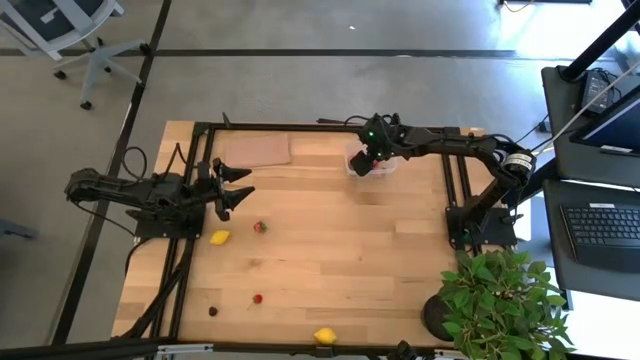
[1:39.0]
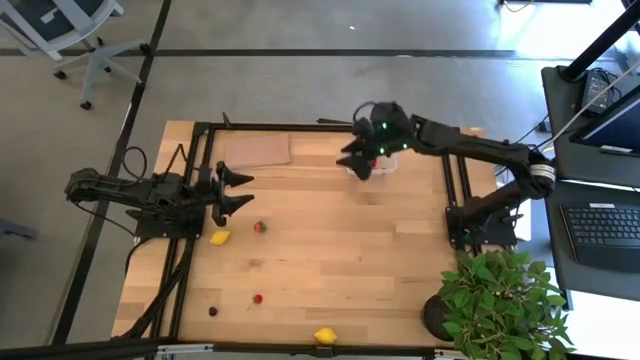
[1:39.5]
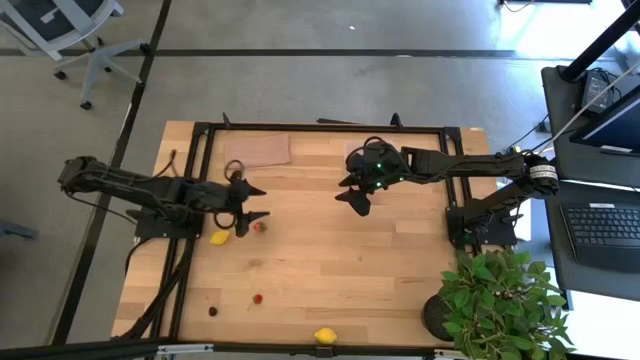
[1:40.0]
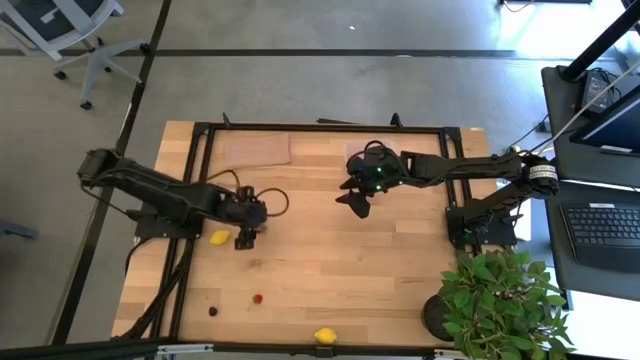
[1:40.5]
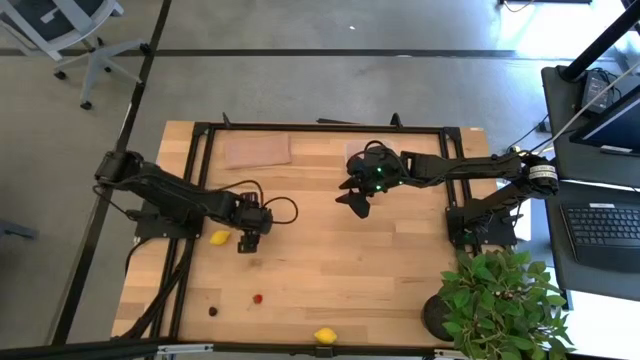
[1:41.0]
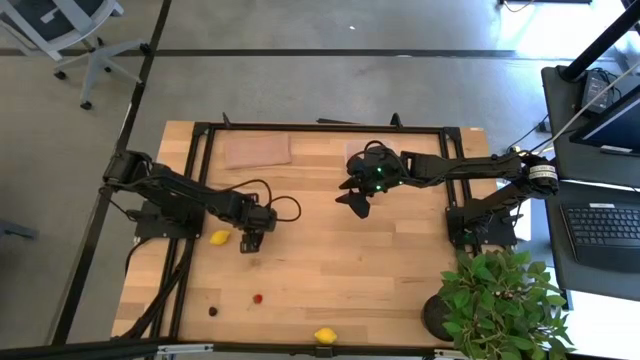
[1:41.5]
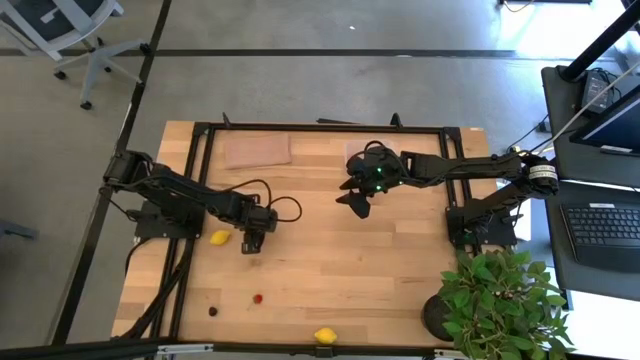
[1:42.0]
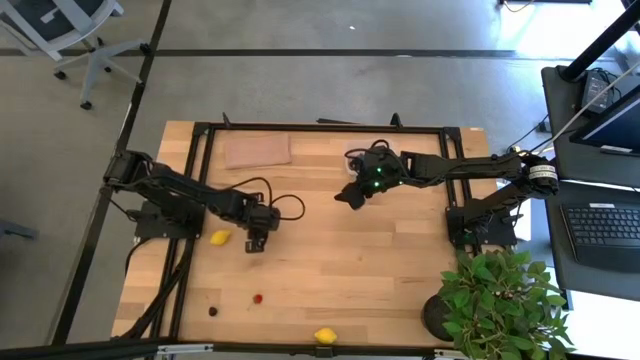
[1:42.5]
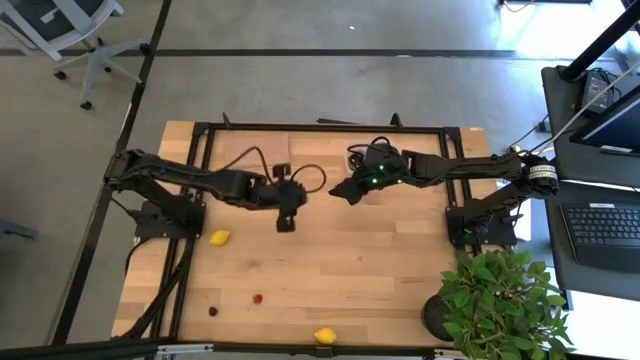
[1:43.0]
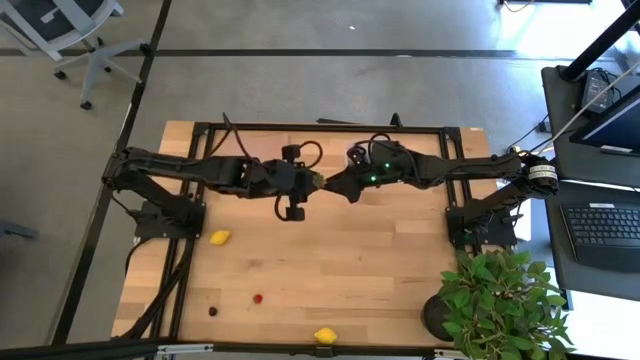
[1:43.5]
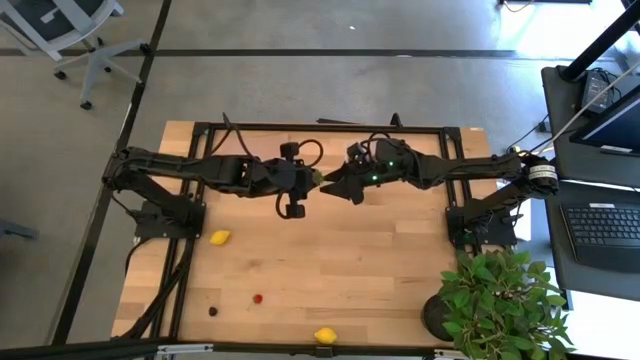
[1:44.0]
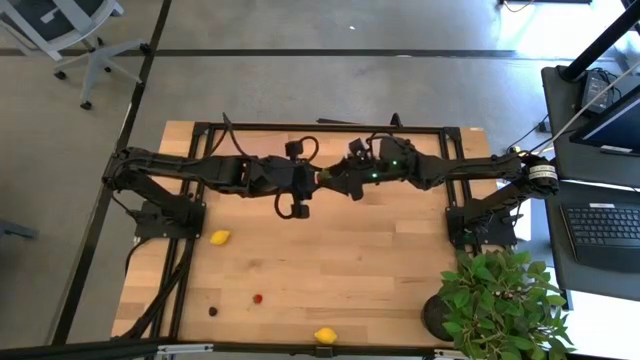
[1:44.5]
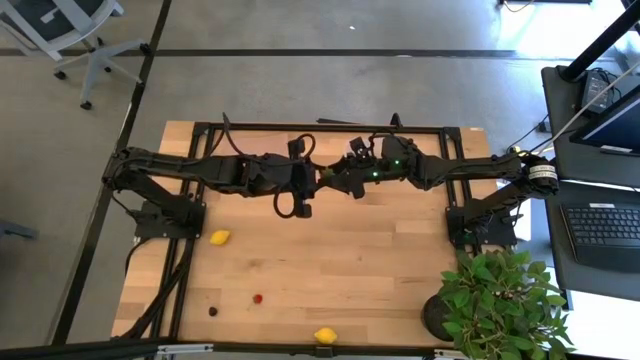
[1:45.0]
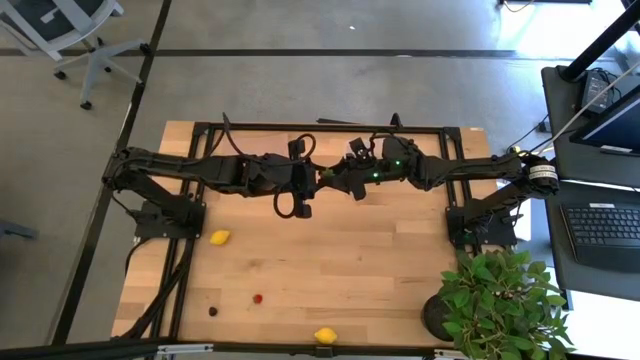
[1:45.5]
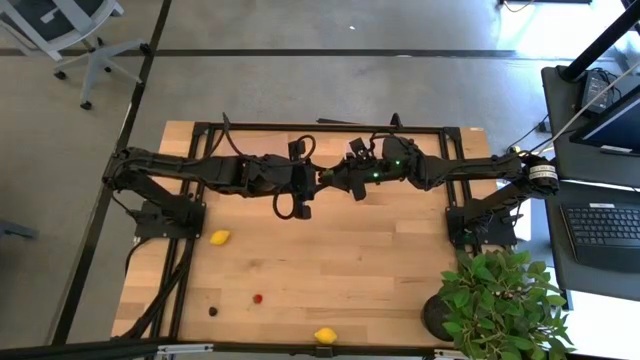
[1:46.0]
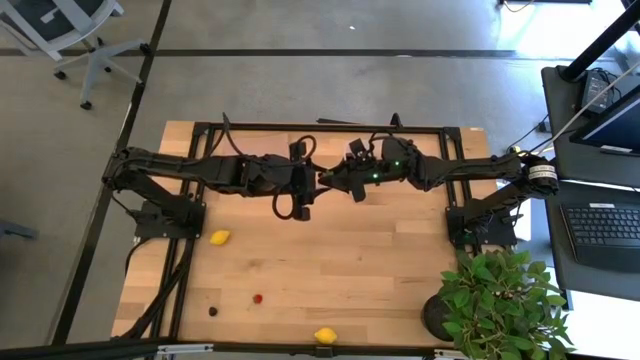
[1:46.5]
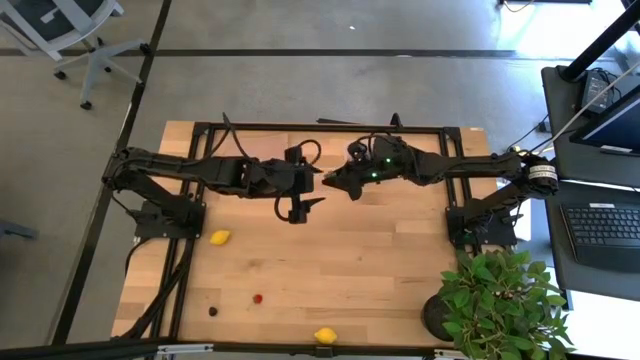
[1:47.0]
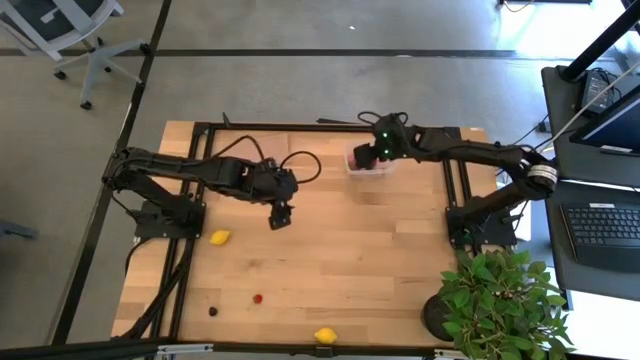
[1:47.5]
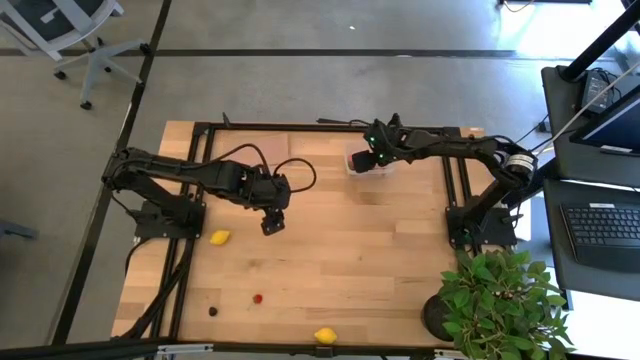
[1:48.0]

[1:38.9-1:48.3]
Task: Pick and placing Produce into tupperware
Put the strawberry into the transparent bin

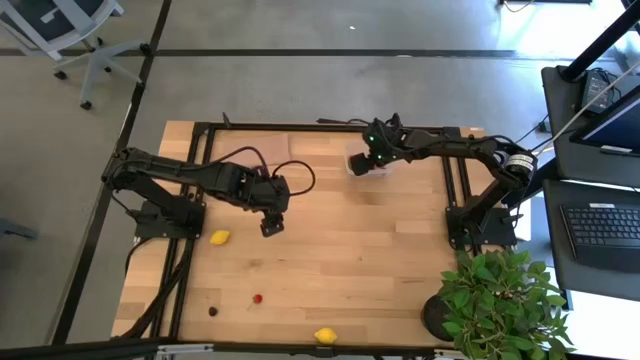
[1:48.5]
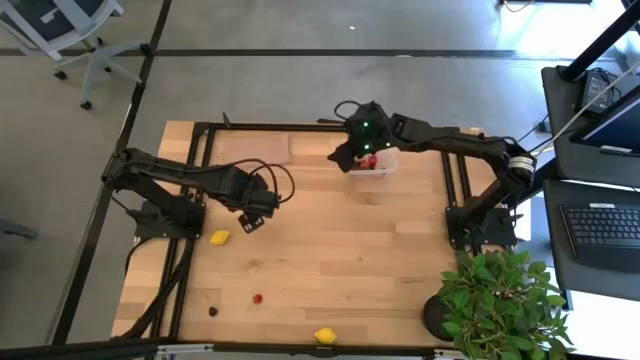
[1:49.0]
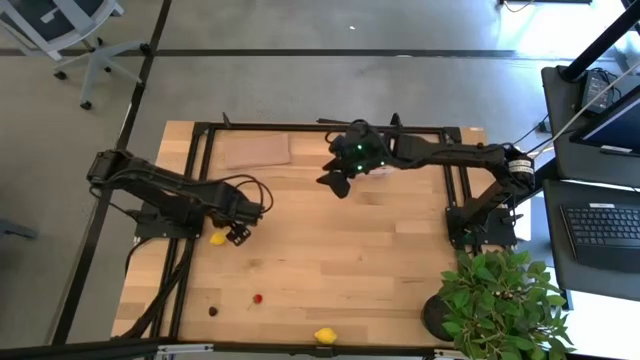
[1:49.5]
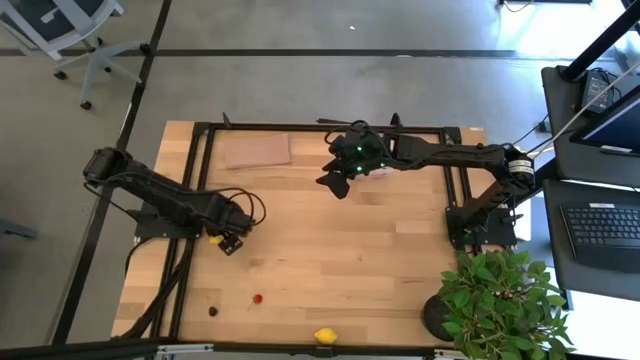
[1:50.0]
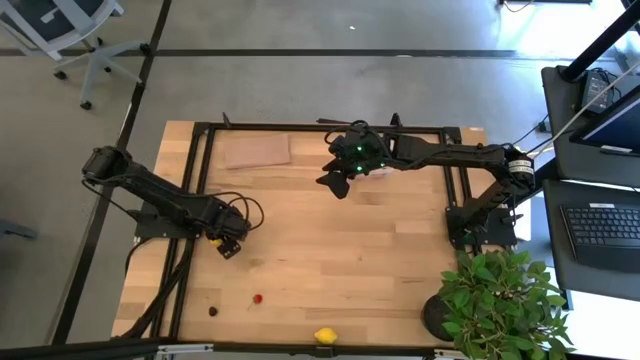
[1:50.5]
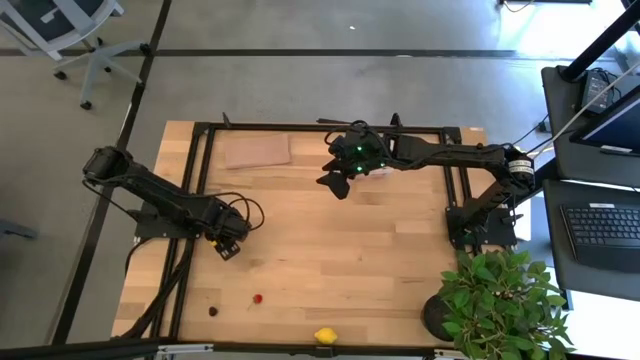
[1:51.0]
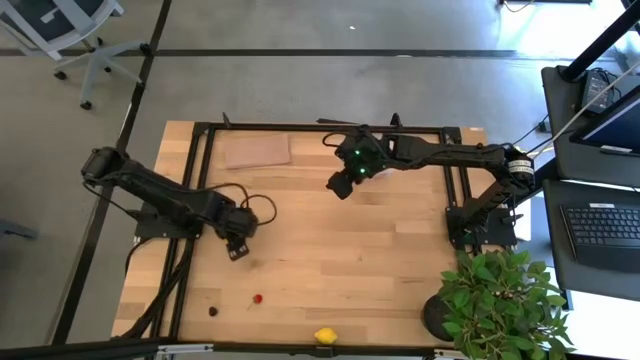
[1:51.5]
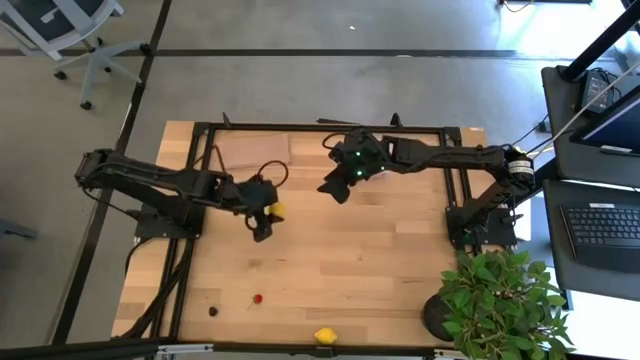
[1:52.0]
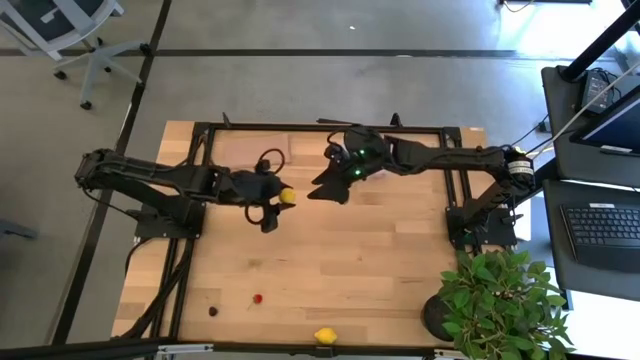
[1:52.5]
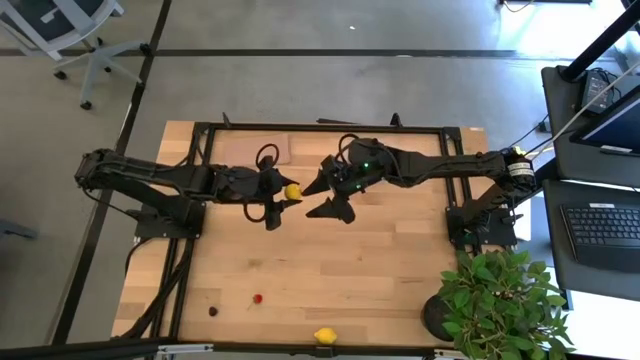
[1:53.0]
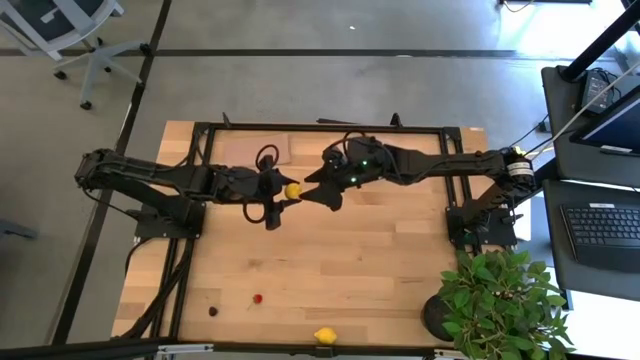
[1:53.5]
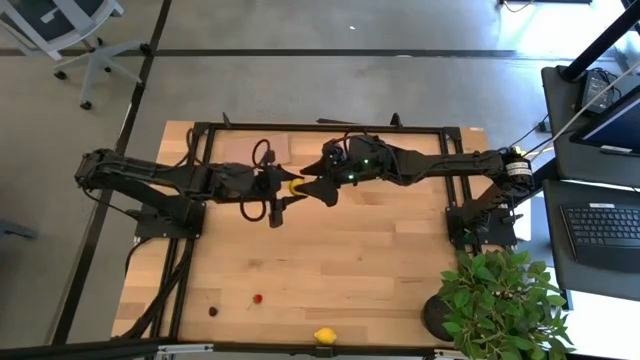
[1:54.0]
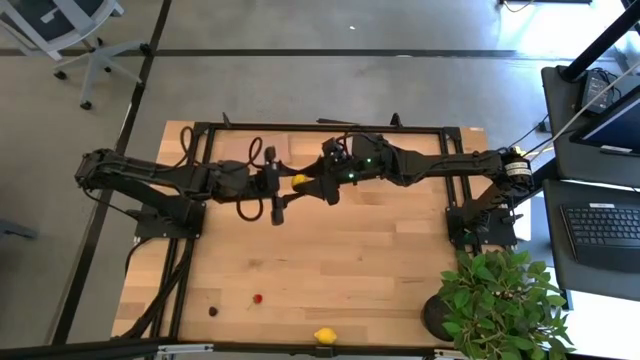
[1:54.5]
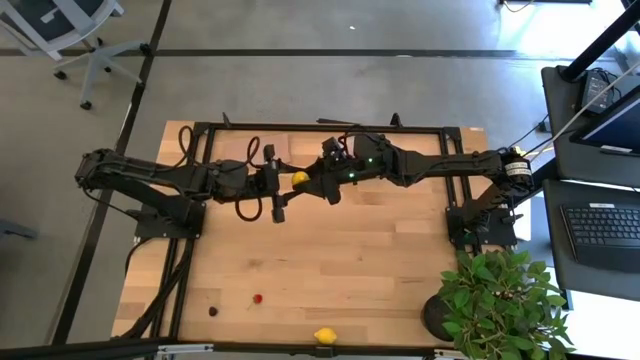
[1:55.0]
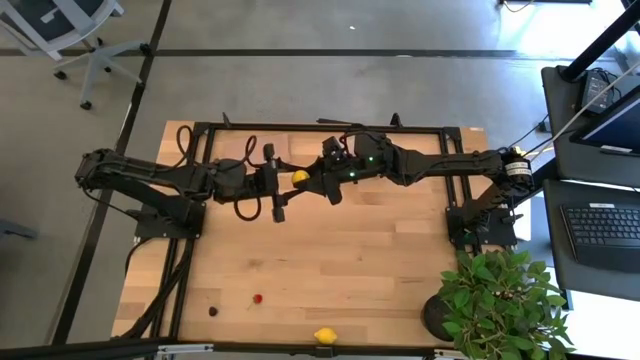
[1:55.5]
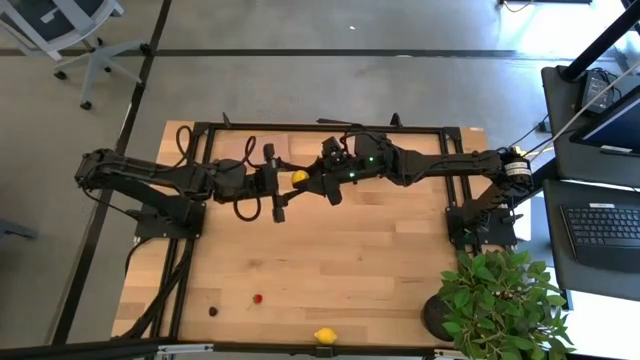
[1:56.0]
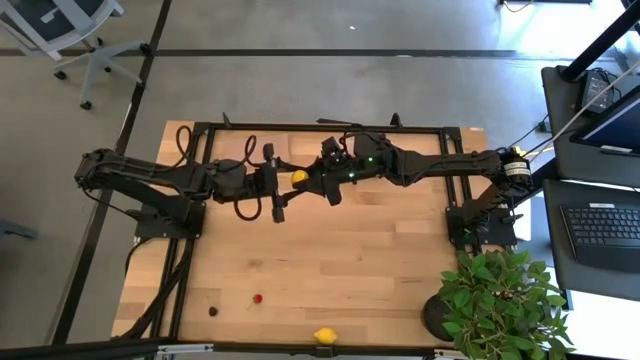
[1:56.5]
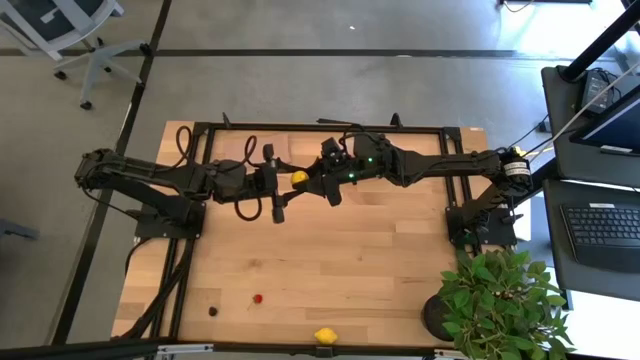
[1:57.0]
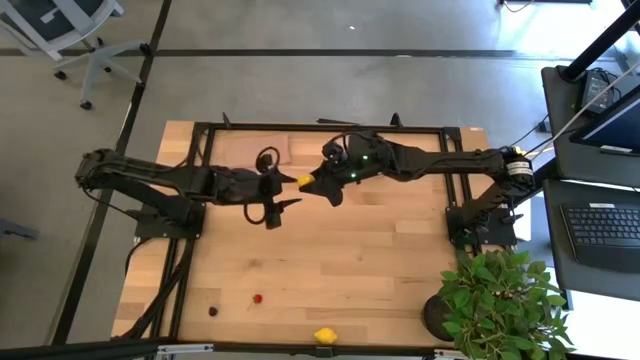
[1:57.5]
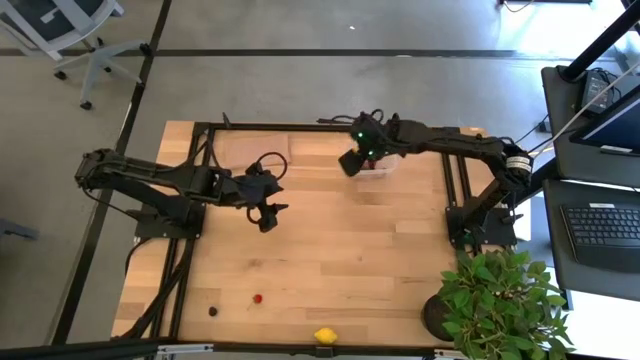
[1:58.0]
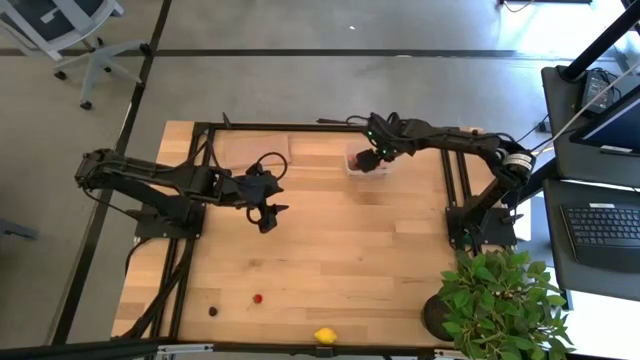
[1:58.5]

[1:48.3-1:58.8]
Put the left lemon into the transparent bin

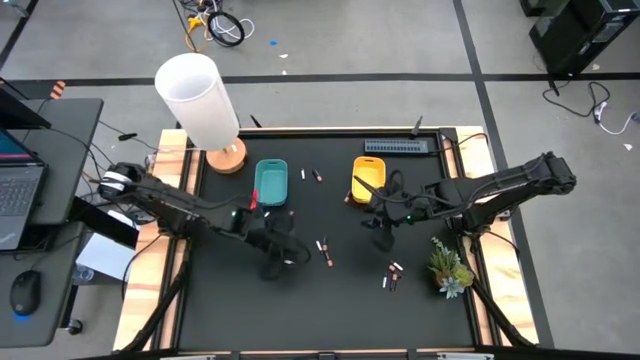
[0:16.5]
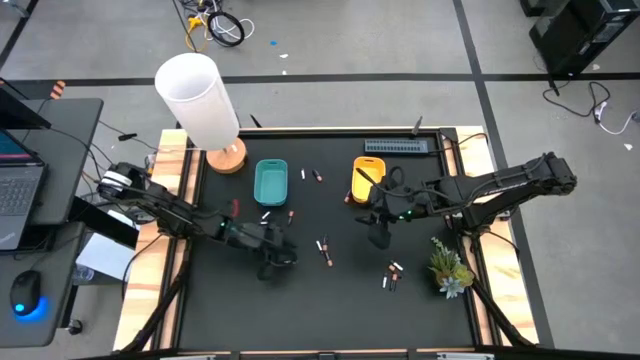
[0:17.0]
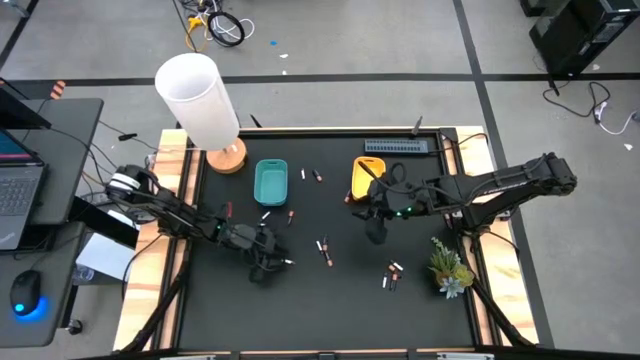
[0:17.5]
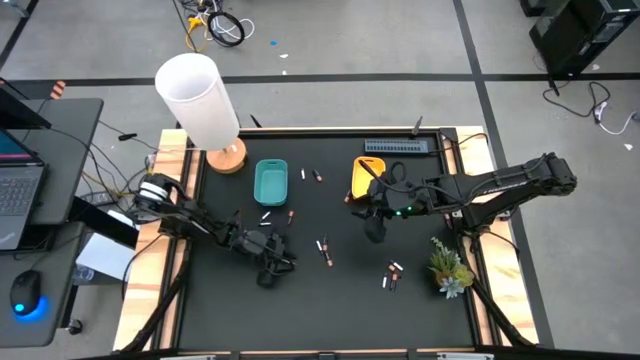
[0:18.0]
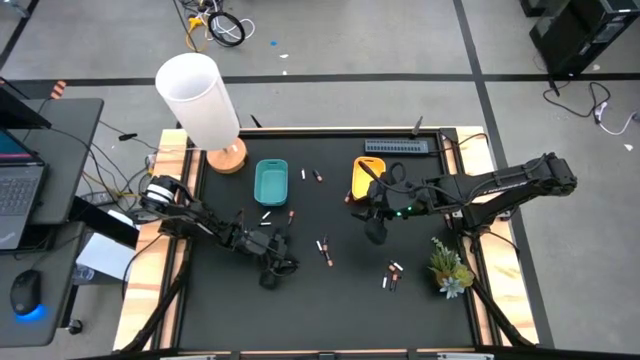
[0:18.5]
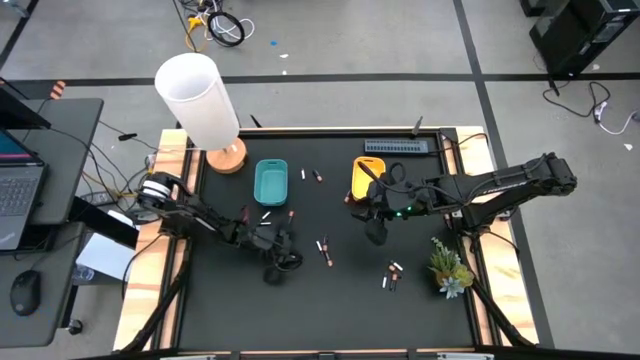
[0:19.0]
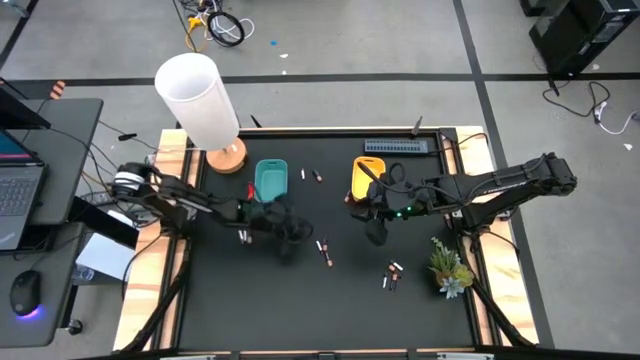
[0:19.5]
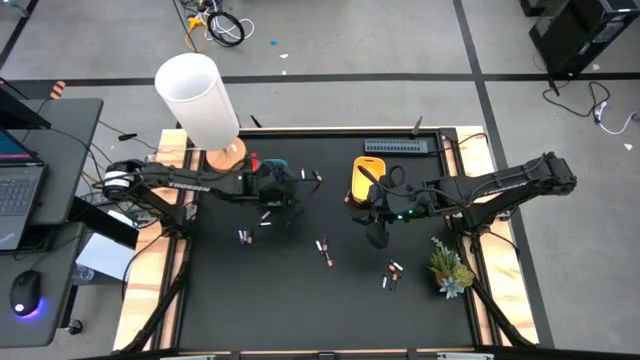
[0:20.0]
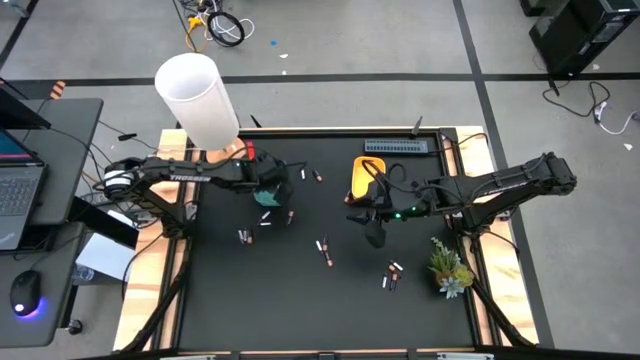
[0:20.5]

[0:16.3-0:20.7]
Task: Sort batteries
Put the silver battery into the blue bin
